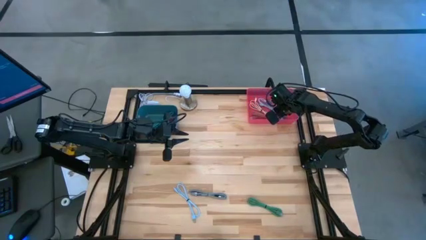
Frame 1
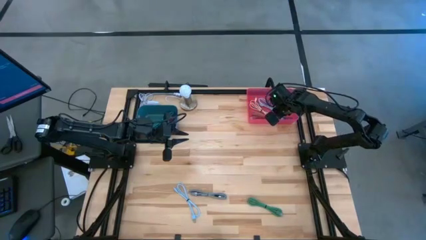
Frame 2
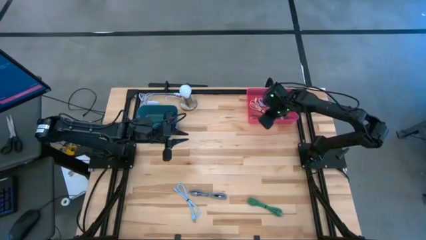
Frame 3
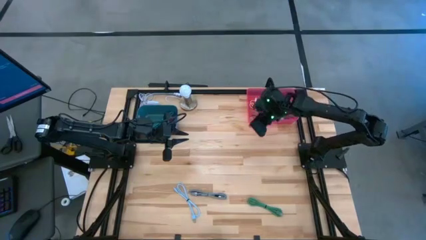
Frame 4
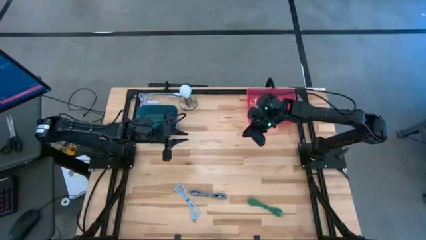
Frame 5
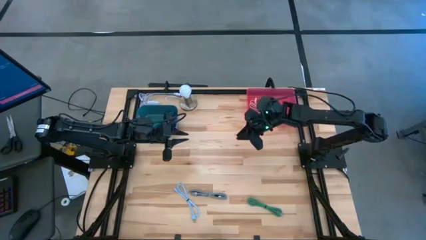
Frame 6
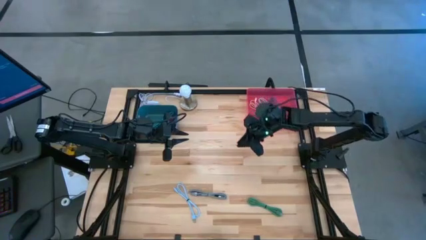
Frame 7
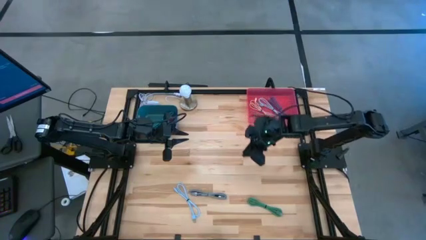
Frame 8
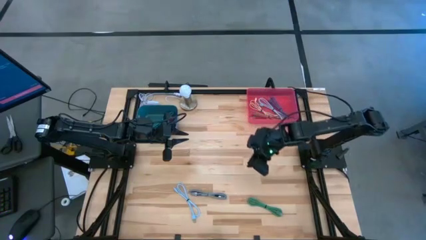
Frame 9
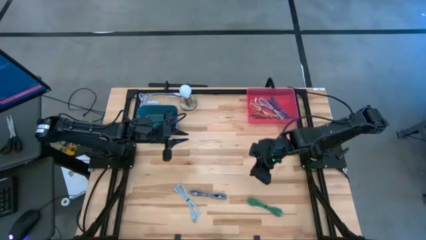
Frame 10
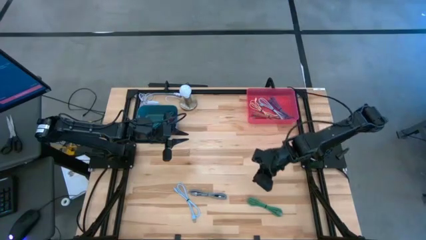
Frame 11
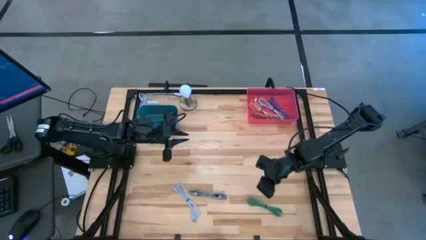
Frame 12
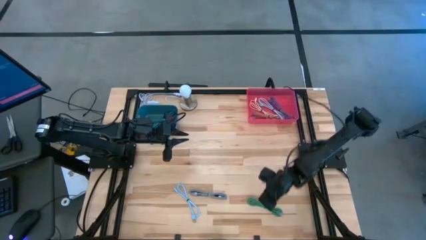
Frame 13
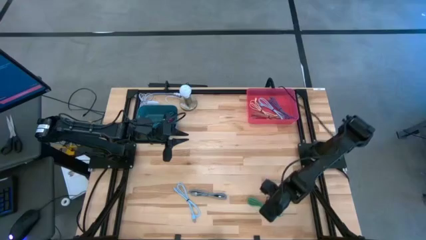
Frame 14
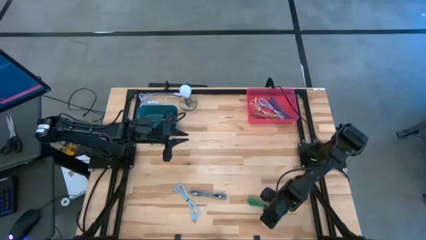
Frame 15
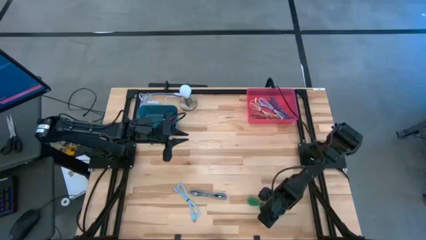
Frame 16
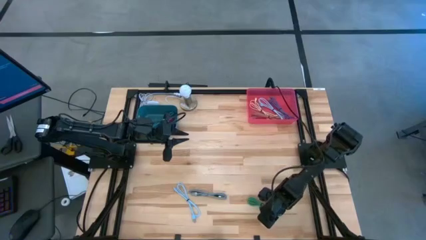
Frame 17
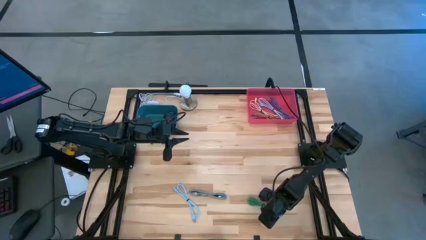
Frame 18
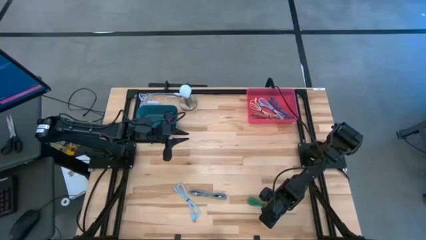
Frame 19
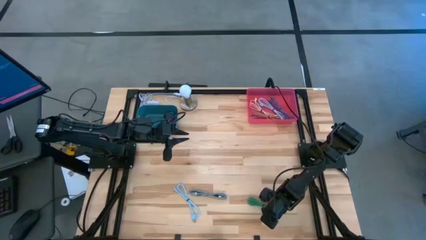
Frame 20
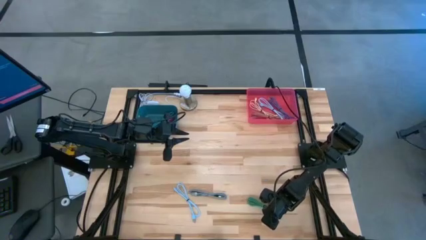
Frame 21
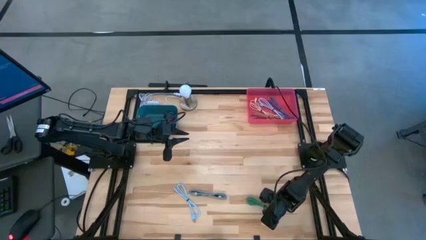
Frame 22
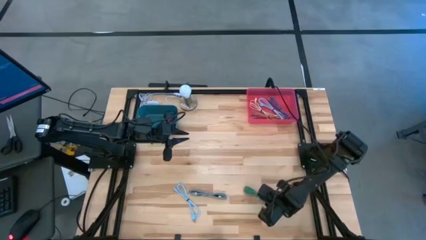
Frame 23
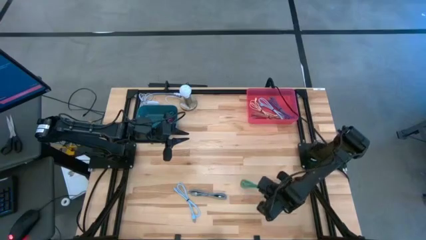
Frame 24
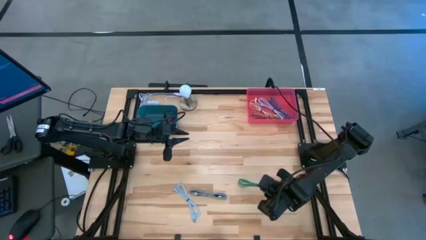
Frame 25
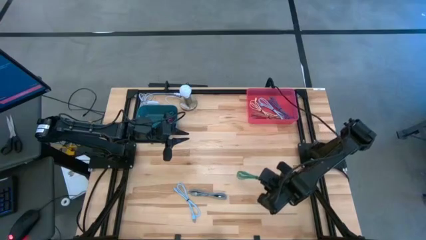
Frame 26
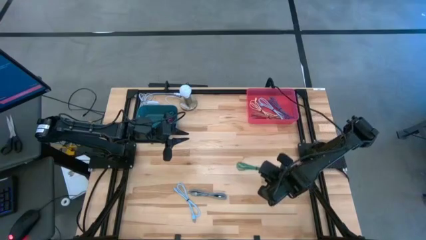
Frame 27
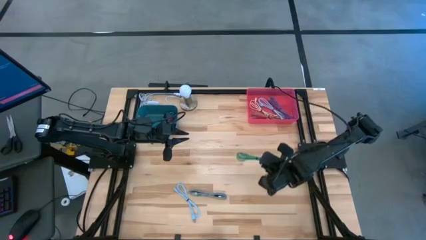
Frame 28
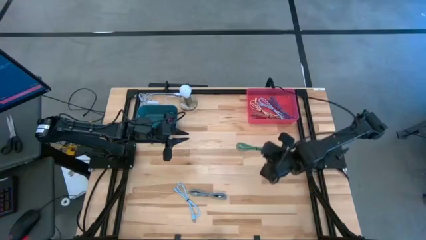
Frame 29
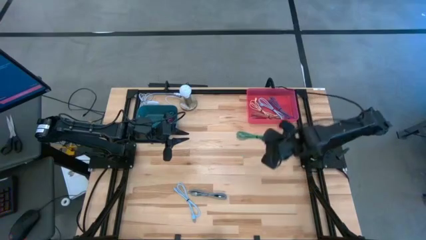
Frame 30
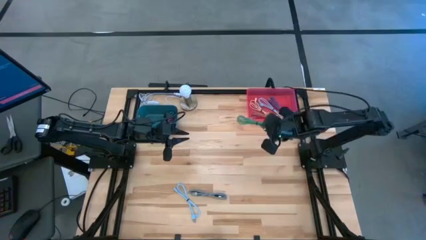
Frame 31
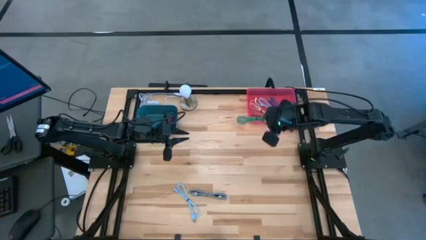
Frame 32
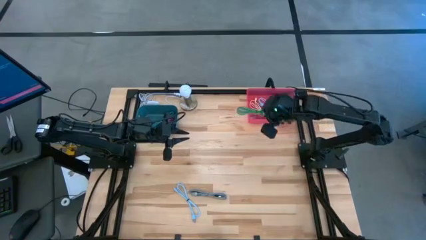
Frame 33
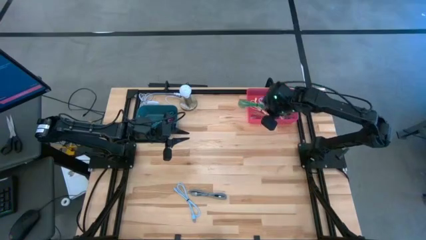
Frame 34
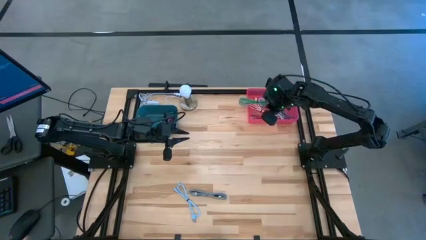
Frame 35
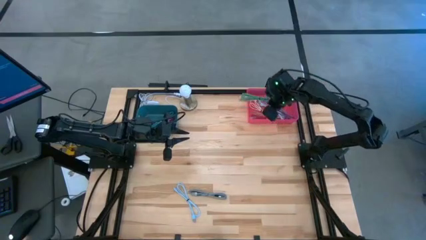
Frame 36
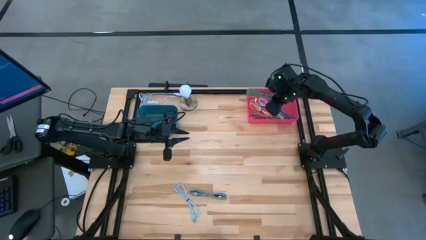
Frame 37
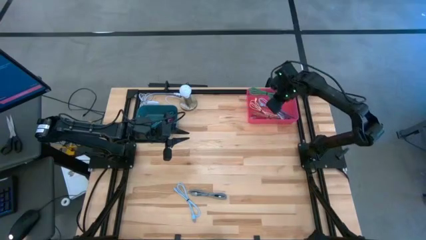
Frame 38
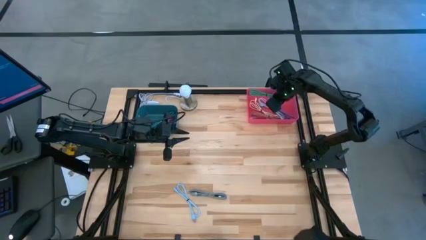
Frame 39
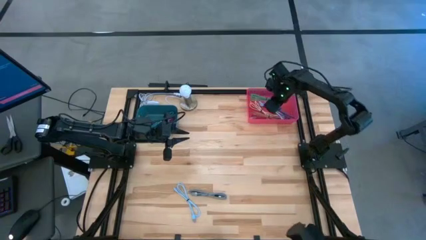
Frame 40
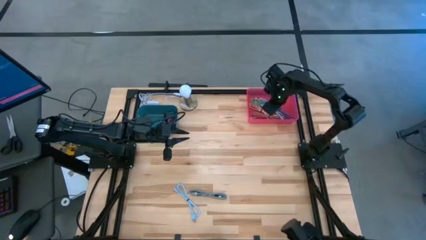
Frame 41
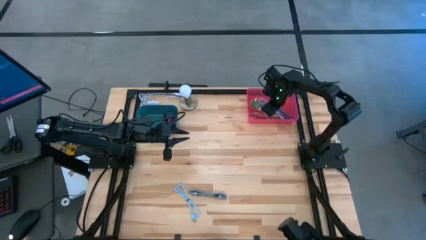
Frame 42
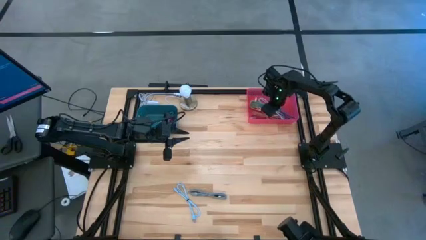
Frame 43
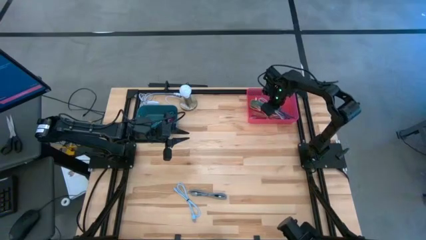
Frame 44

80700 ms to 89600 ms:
Task: Pick & Place USB Port
Put the plain green charger cable into the pink bin

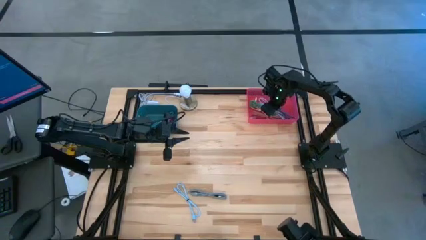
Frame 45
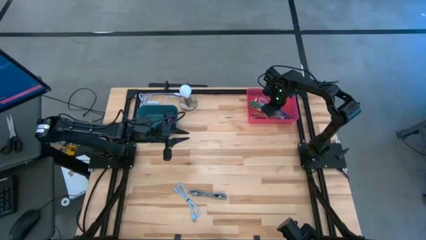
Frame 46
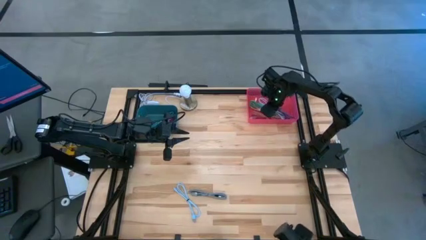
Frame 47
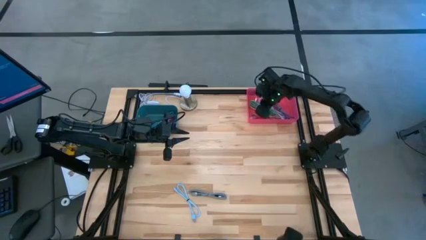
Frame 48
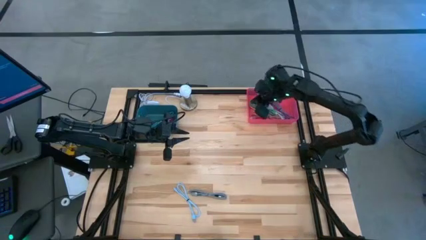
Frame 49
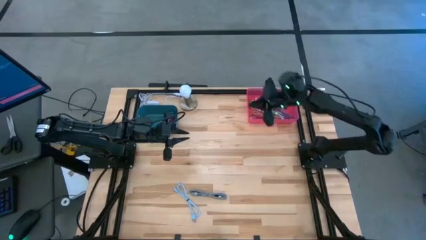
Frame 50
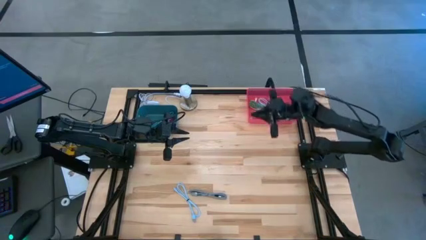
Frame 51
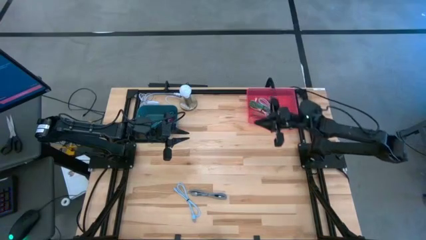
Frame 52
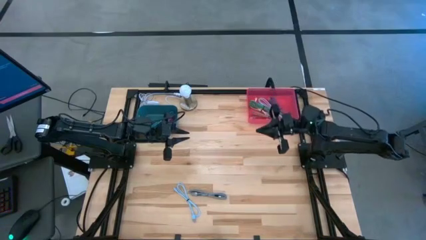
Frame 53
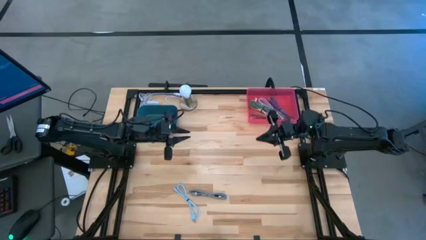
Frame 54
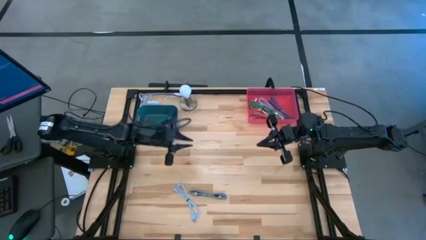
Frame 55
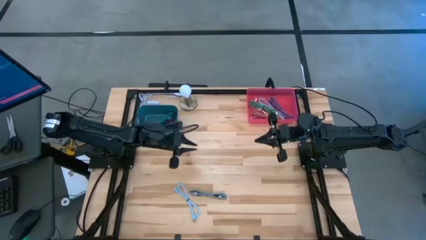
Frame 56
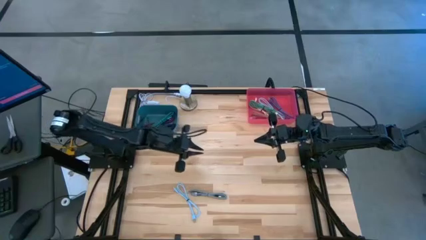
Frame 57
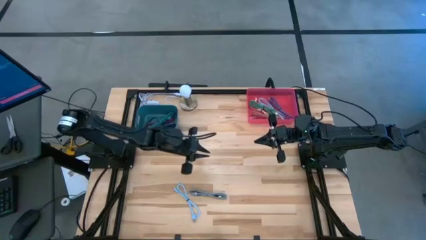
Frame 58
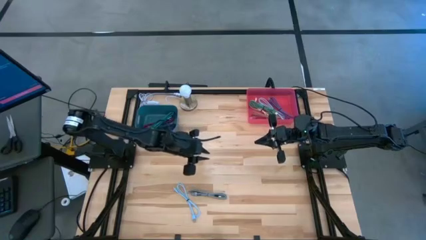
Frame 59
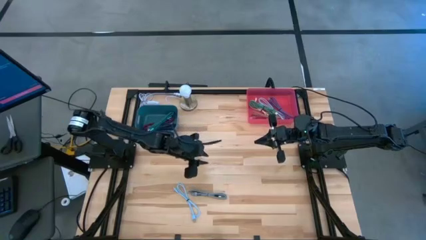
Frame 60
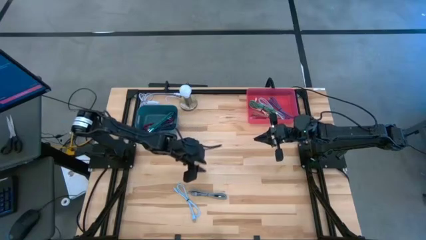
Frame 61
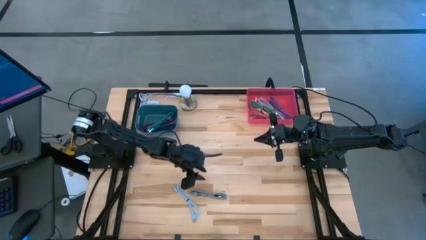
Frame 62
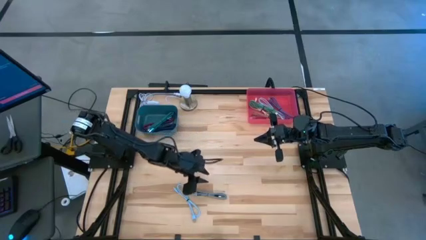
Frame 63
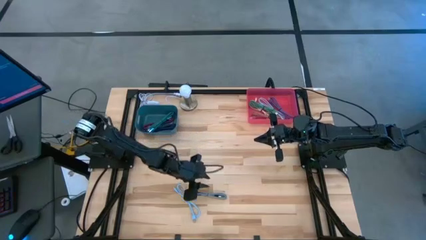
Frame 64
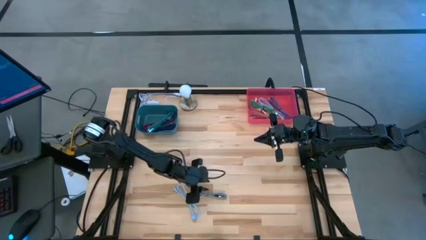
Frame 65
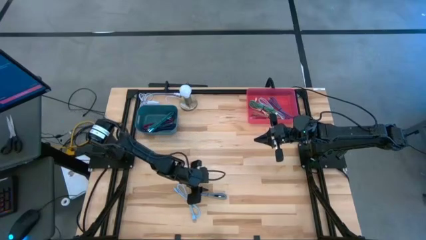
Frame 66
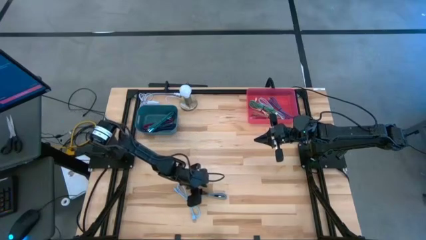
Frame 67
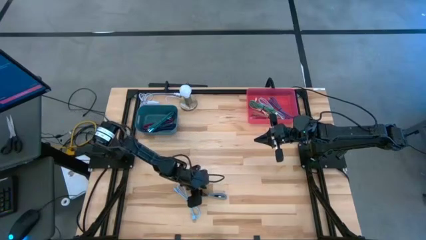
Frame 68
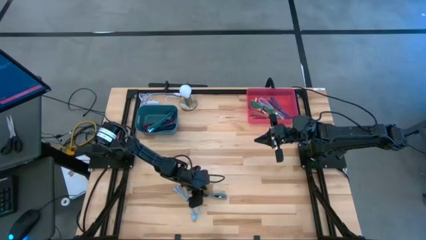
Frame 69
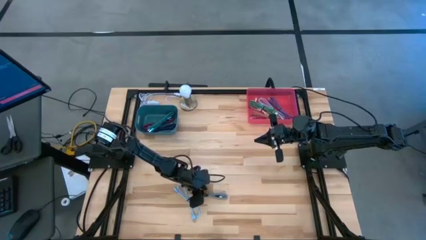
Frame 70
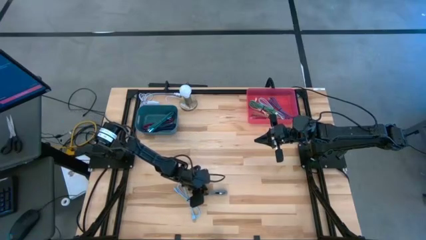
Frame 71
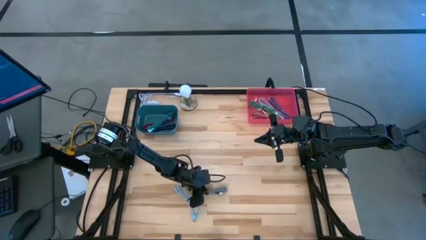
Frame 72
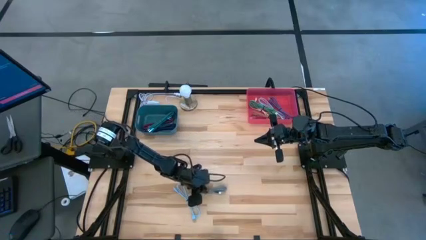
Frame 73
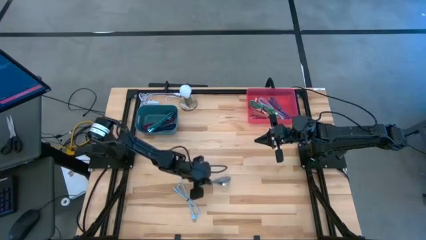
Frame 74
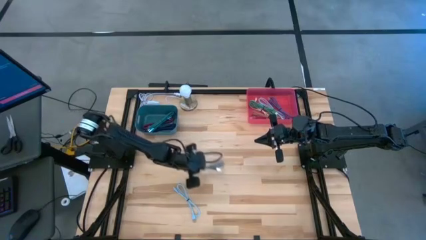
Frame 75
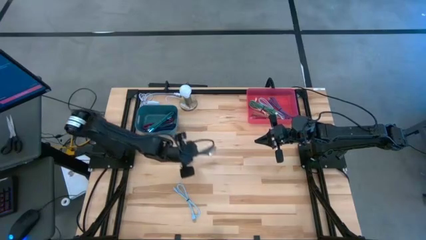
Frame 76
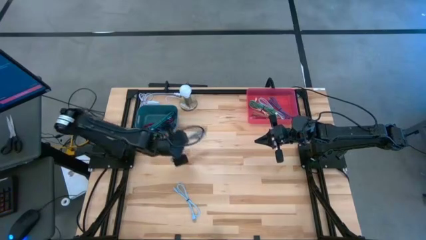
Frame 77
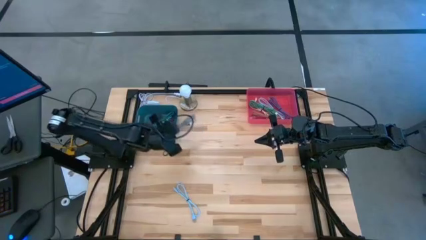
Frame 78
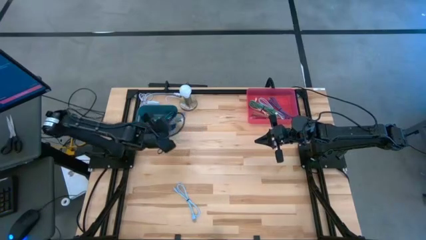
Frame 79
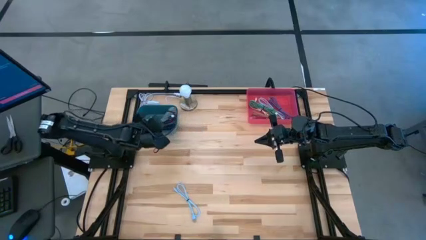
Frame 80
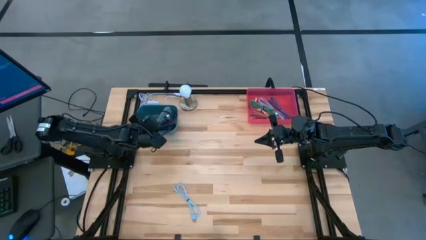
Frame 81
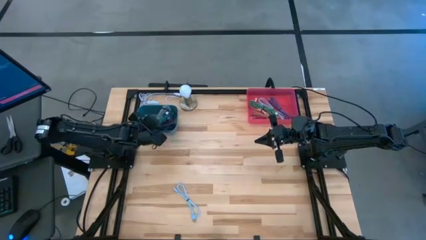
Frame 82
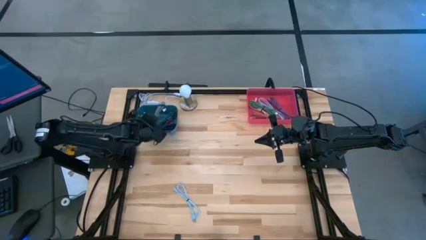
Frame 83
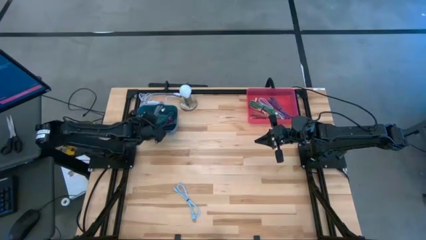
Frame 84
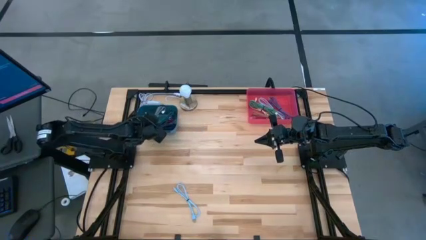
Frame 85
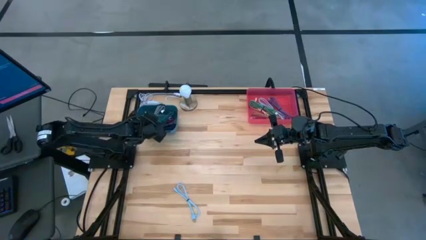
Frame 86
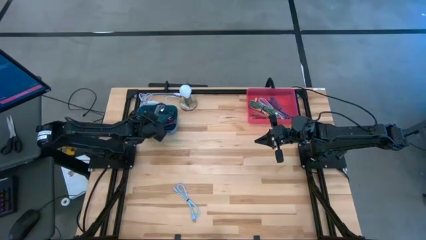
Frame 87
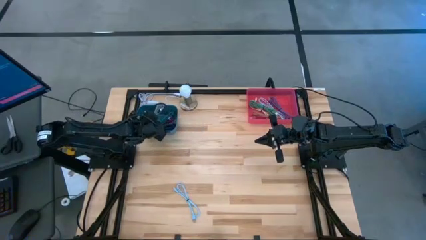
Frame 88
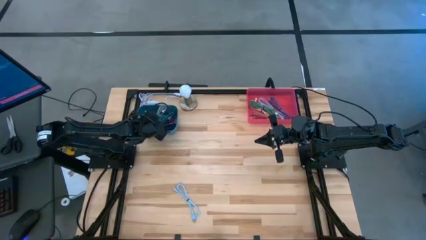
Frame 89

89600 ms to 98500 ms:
Put the striped white and black charger cable into the blue bin
